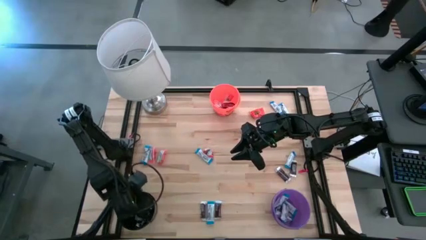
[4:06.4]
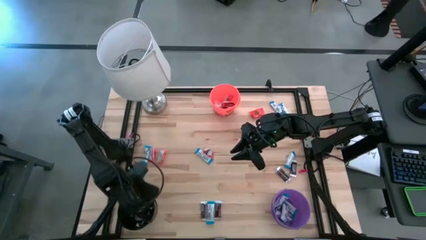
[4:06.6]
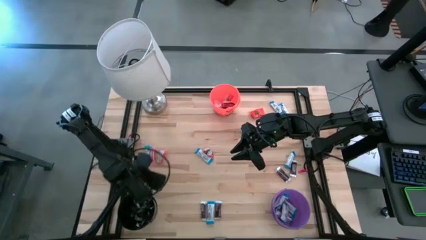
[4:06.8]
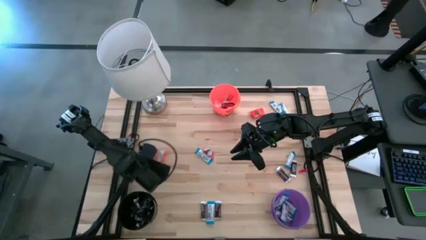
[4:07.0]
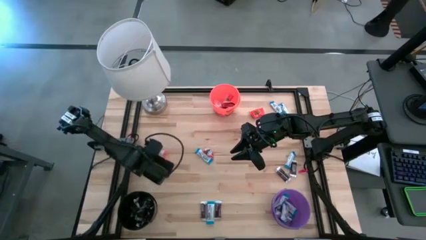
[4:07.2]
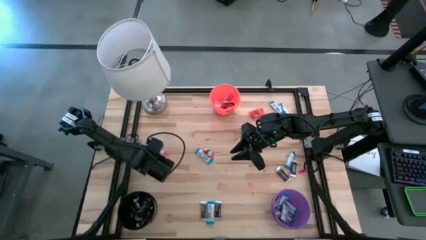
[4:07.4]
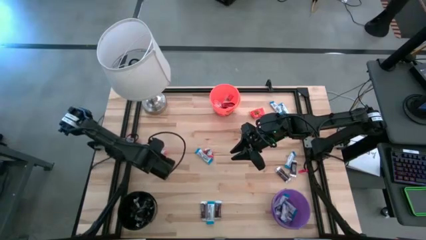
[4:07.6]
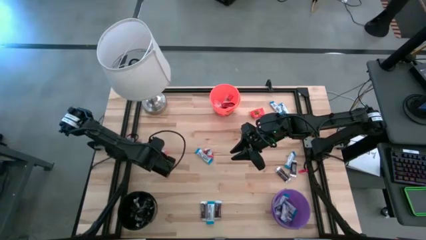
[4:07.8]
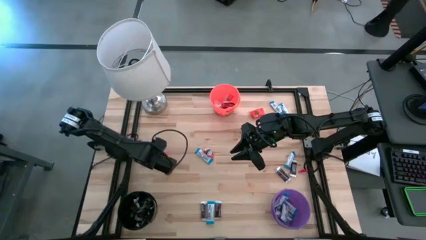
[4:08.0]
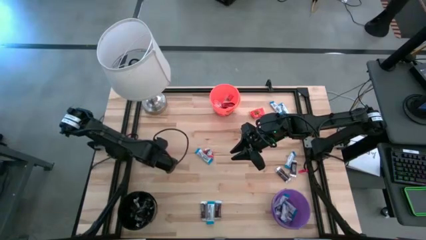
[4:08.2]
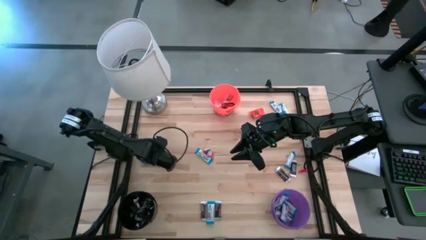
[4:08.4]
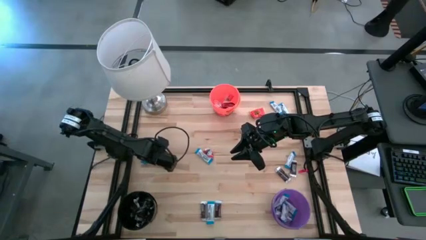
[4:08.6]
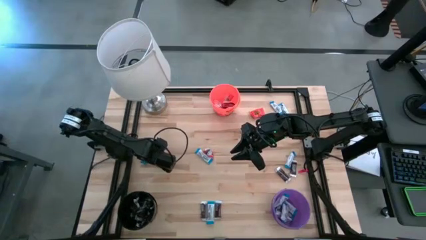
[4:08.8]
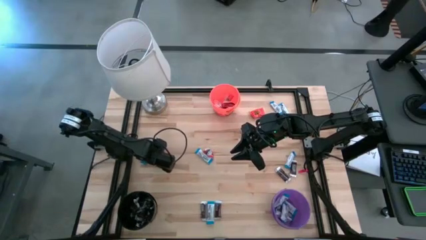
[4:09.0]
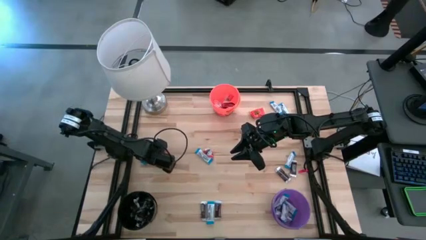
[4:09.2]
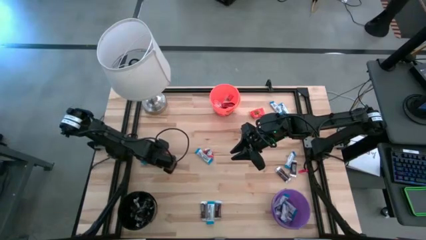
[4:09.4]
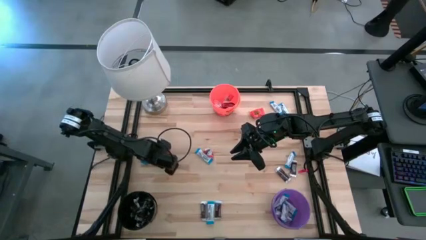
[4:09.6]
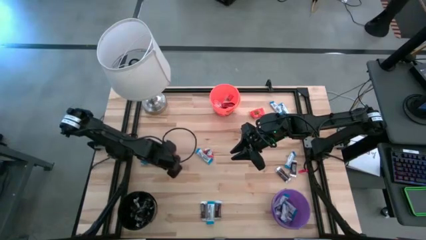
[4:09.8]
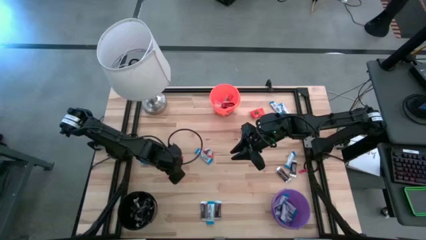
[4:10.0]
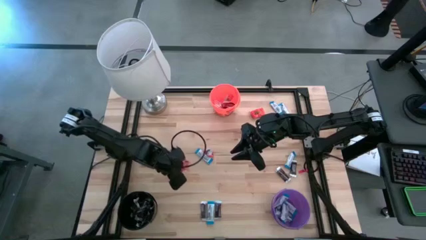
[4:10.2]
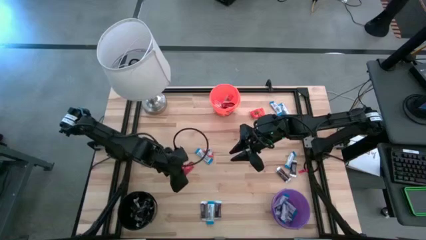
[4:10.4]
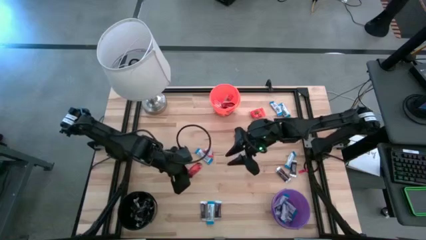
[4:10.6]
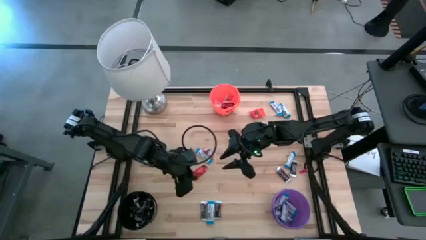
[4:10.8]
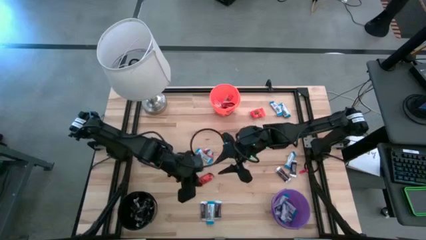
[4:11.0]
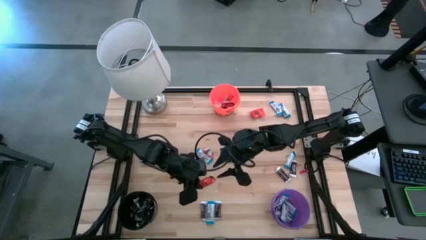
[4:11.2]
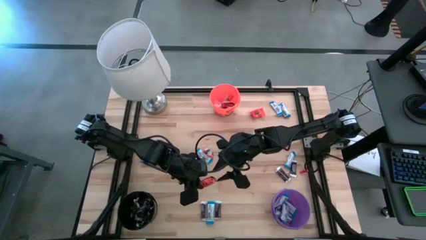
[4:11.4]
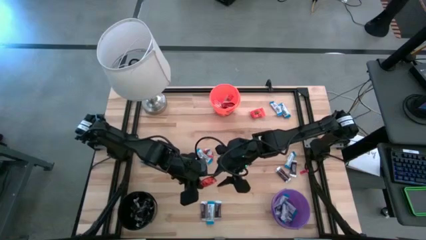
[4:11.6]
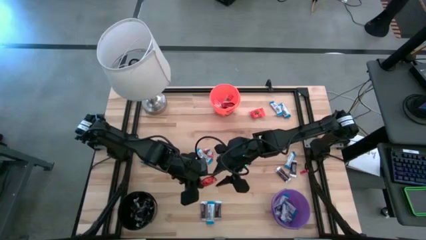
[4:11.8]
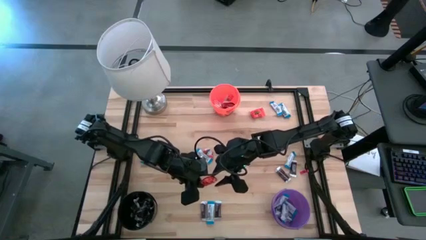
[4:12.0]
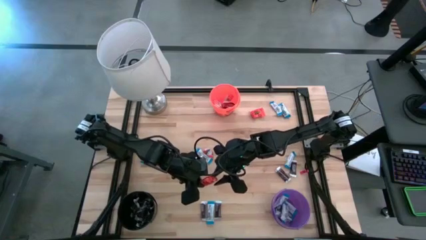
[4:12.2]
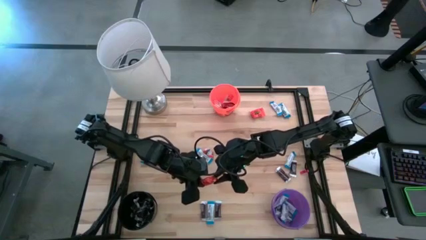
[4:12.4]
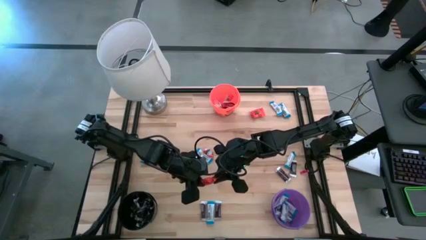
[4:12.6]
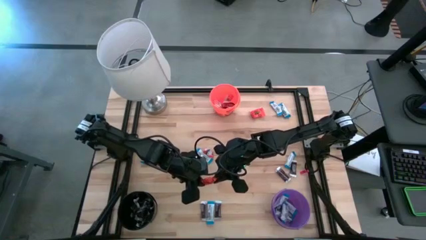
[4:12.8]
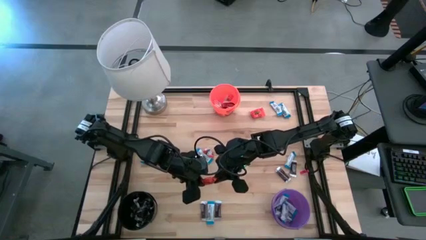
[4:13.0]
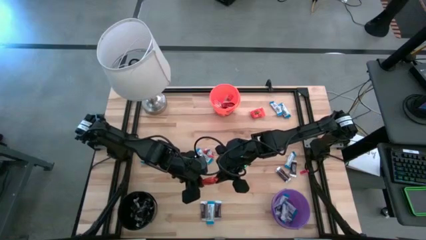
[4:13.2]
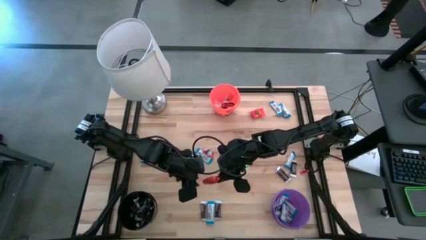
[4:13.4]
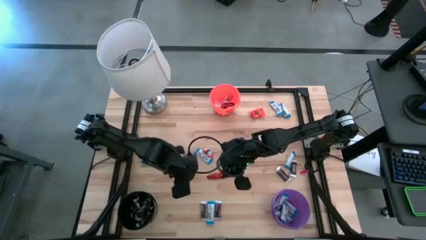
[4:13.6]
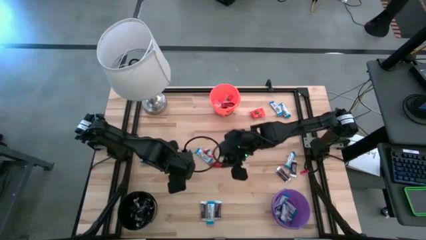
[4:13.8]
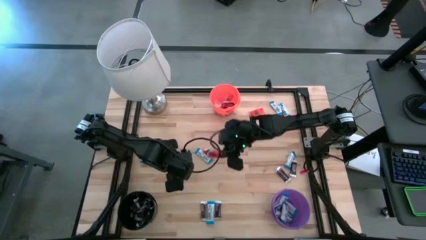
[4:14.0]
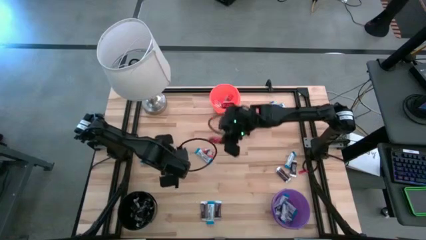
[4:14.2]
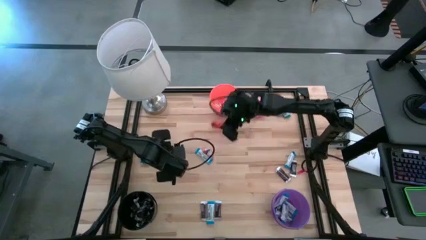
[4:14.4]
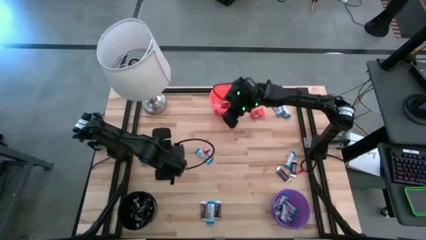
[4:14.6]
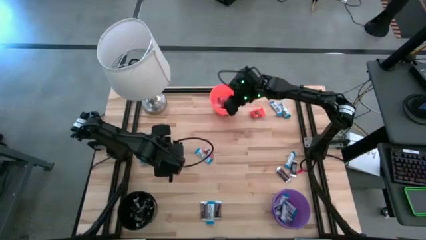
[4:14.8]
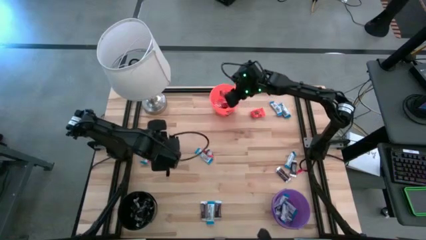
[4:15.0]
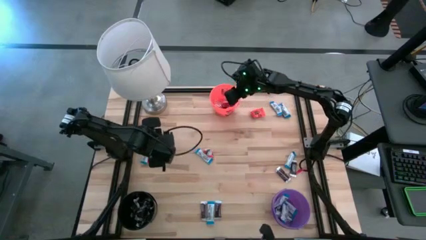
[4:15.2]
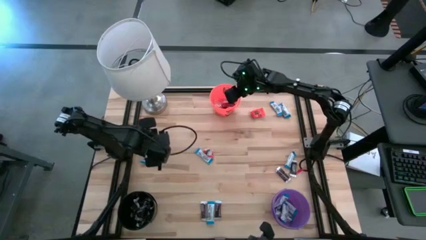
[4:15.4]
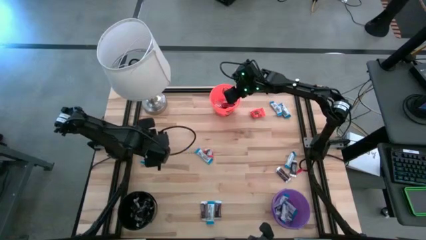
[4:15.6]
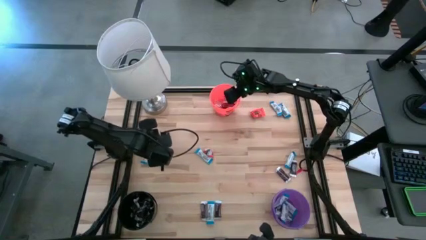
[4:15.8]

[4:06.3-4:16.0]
Task: Organize candy in baskets
Put the orange chocolate into the orange bucket

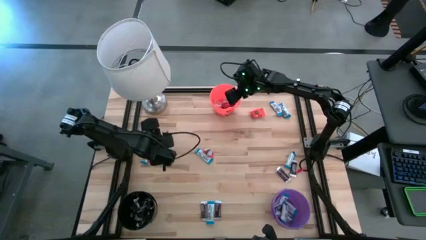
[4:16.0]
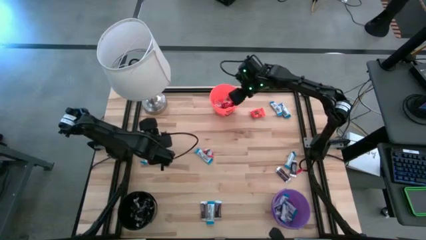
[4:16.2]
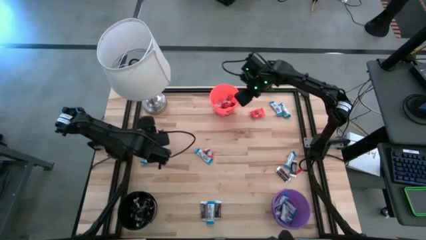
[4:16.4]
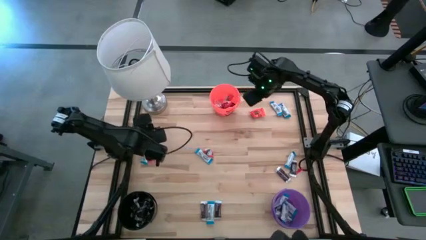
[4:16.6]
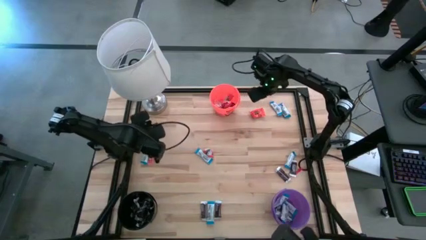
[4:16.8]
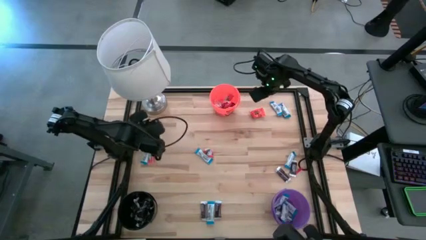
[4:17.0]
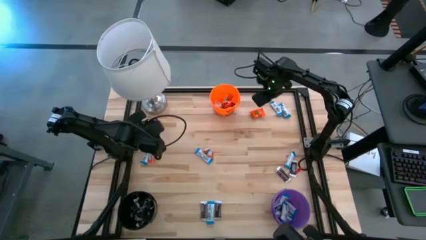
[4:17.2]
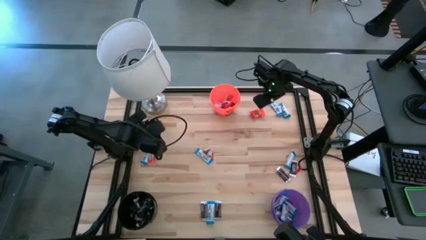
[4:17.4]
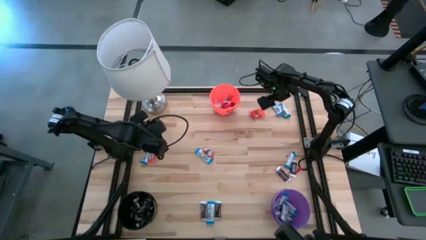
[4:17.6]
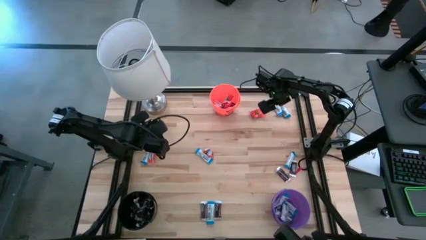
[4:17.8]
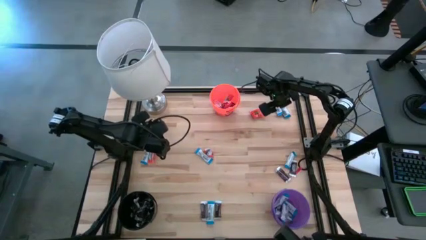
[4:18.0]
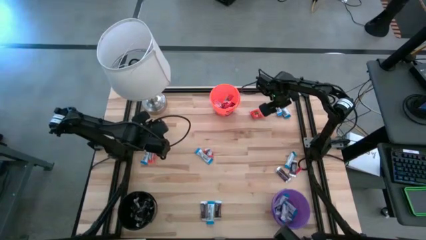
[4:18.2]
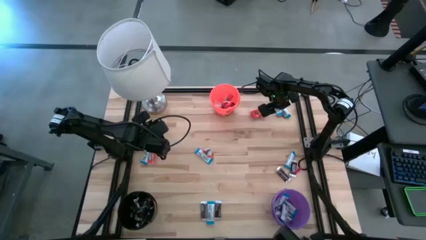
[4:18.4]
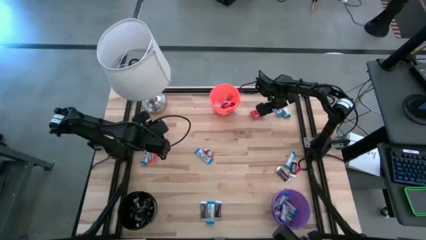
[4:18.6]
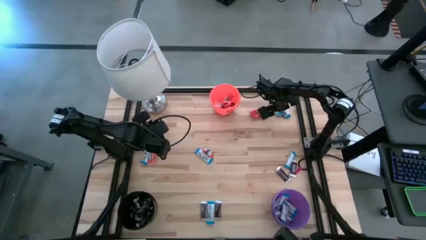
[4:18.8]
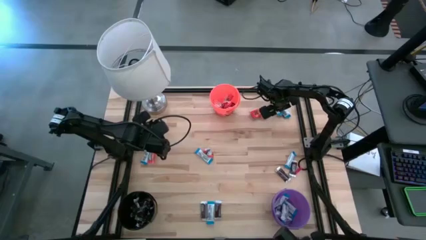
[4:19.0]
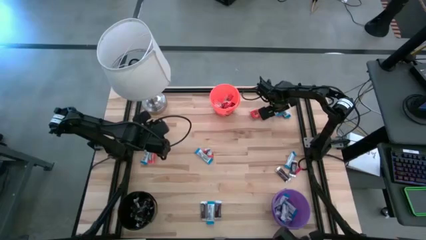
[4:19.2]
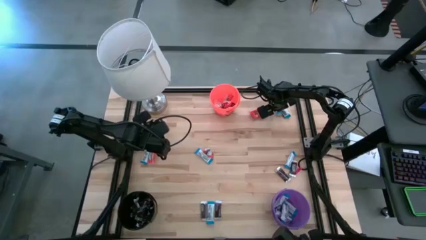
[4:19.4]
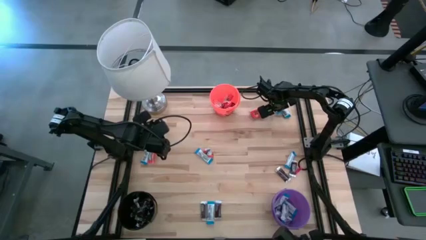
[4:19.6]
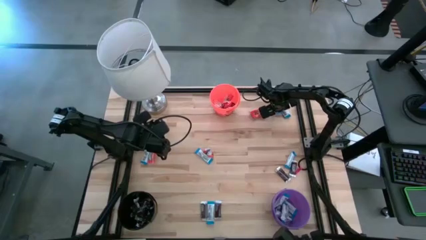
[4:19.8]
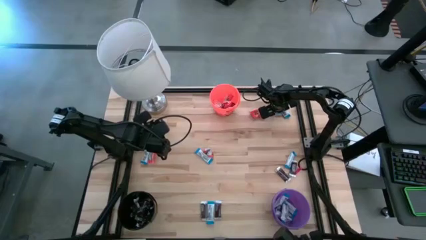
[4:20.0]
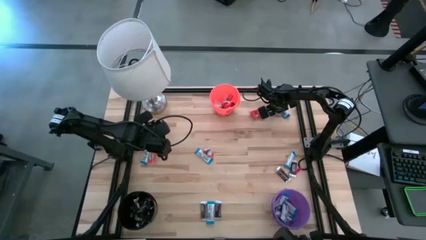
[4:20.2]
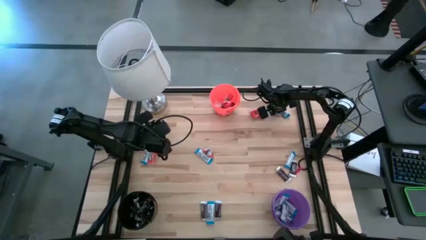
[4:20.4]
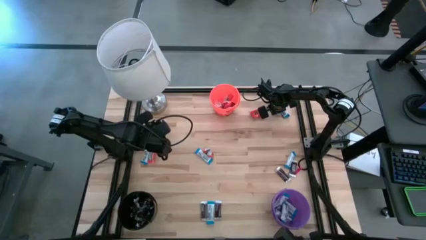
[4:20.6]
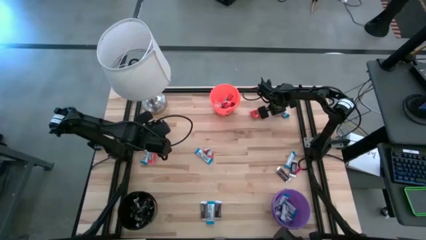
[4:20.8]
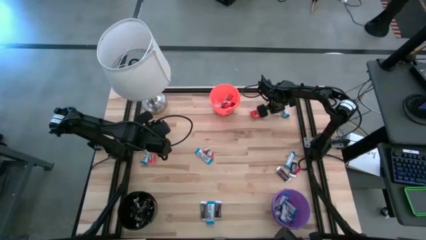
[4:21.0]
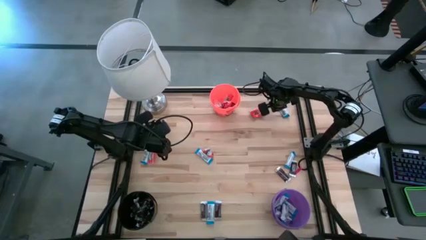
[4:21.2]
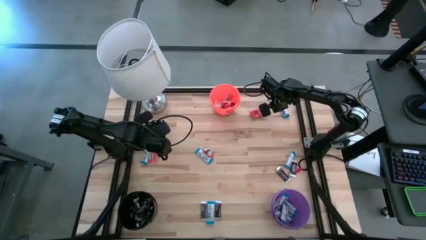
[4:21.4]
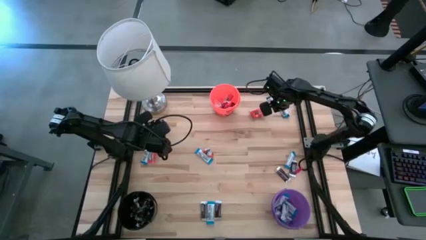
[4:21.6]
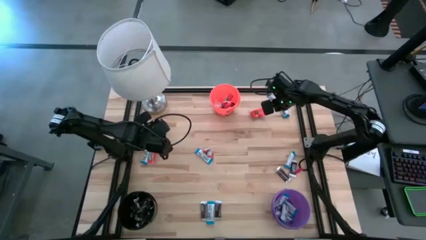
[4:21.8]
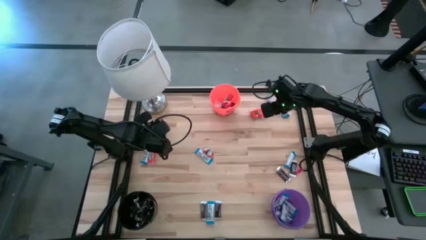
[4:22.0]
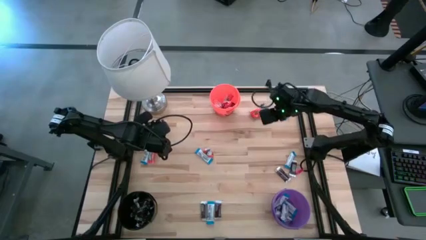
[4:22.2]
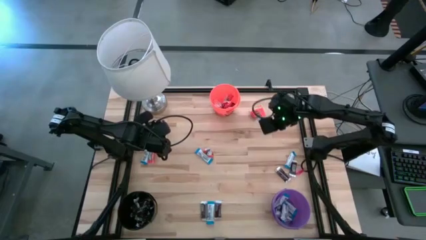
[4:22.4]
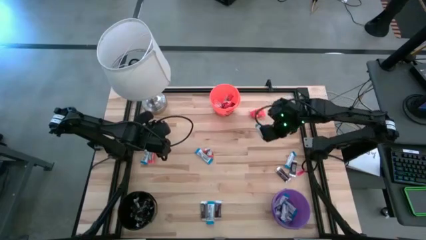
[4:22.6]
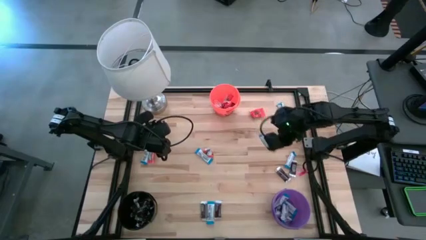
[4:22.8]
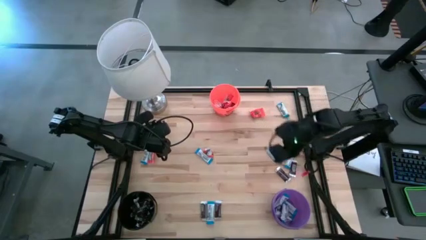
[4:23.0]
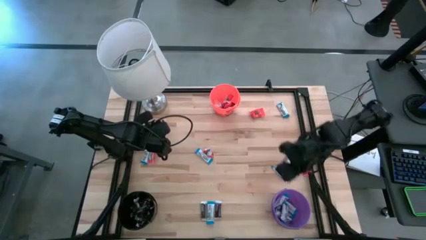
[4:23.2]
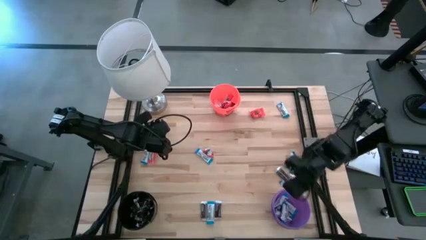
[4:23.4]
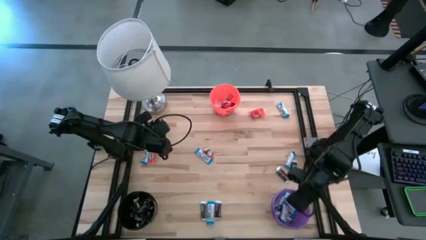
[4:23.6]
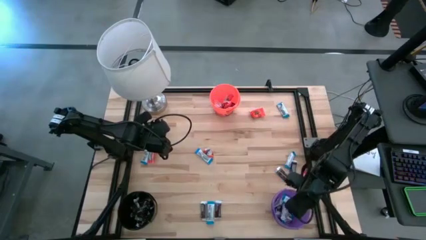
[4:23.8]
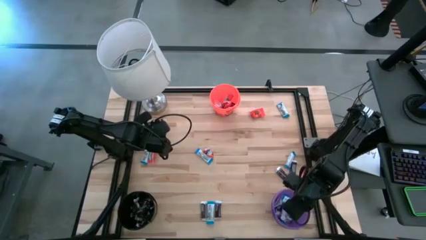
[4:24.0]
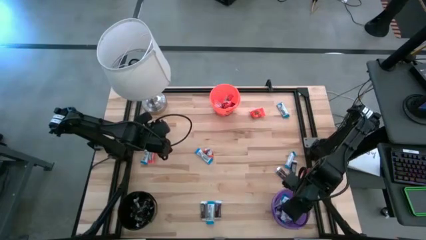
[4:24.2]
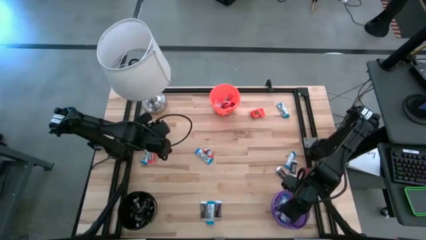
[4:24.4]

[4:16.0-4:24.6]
Put the white chocolate into the purple bucket
